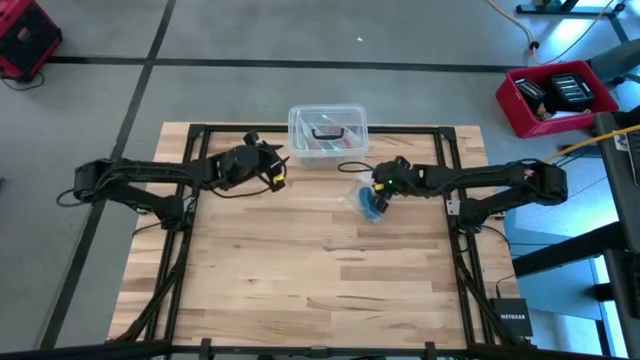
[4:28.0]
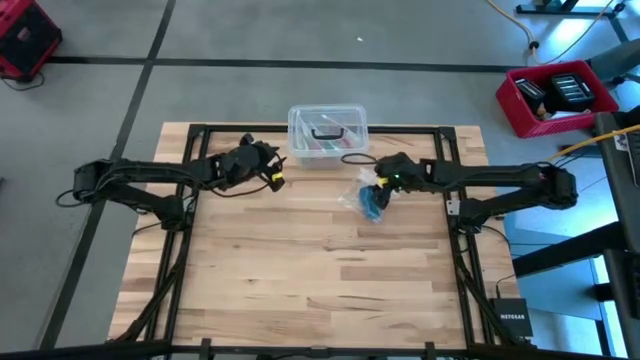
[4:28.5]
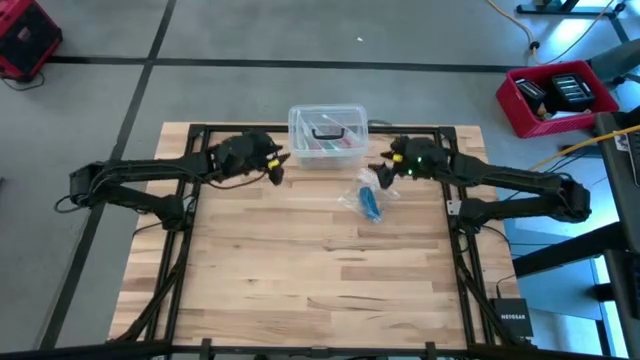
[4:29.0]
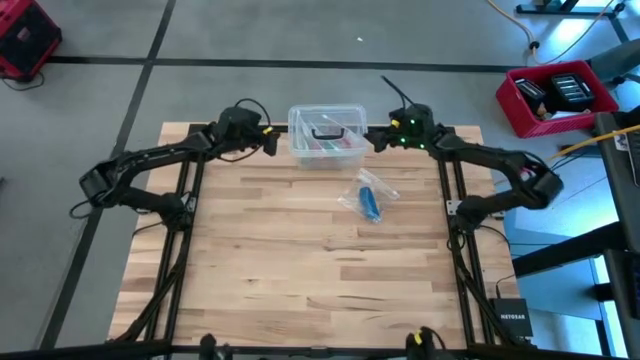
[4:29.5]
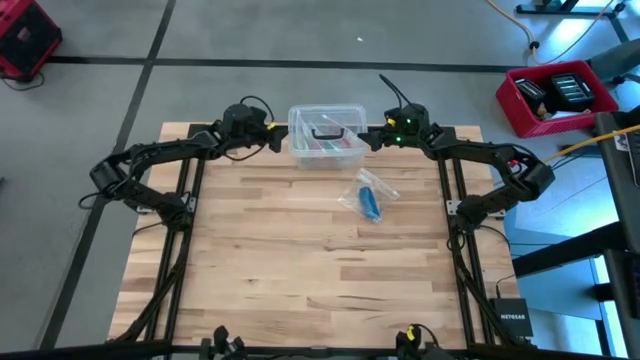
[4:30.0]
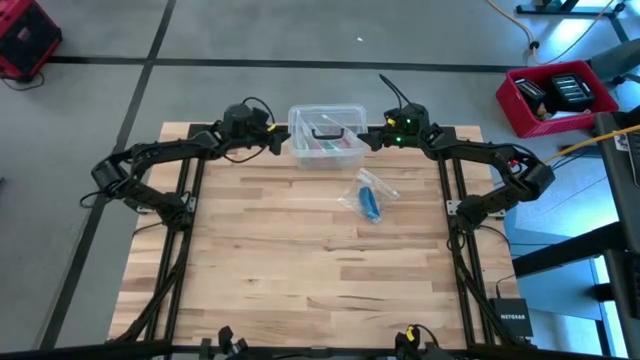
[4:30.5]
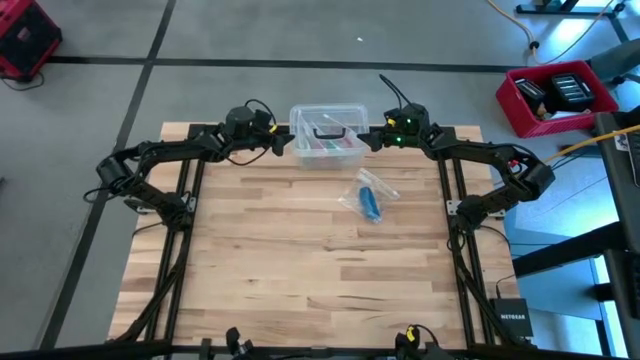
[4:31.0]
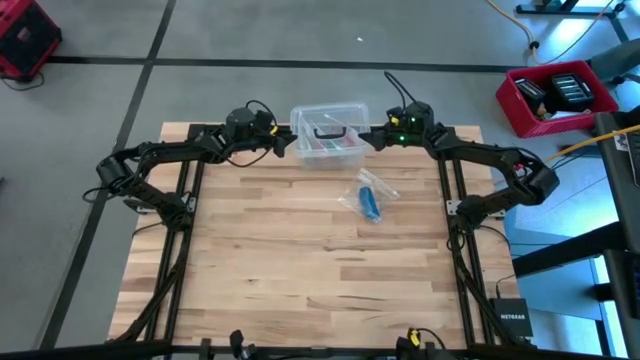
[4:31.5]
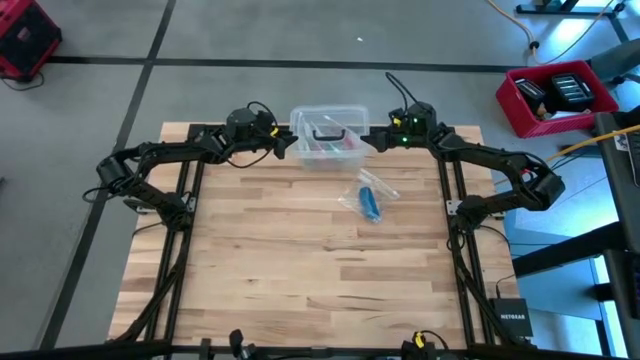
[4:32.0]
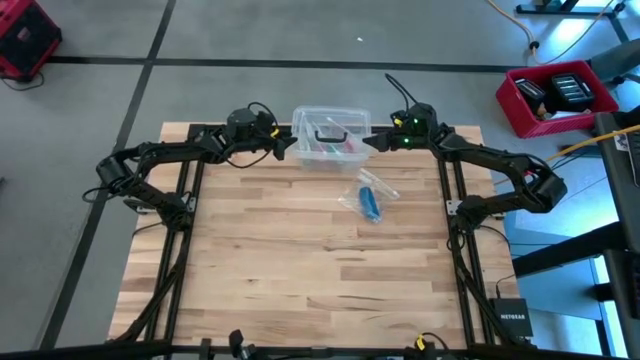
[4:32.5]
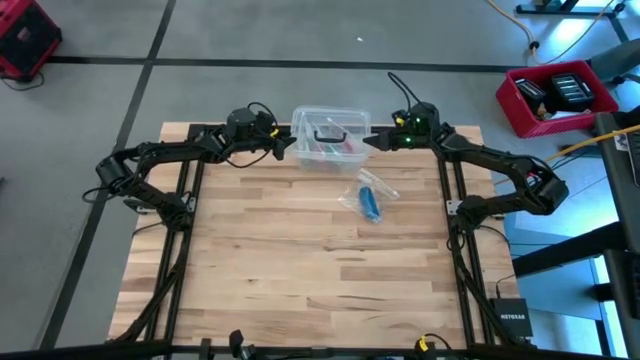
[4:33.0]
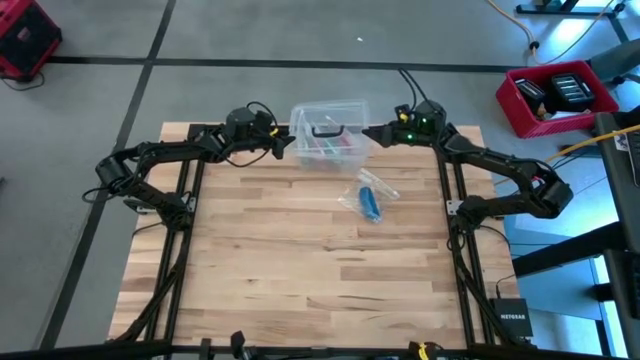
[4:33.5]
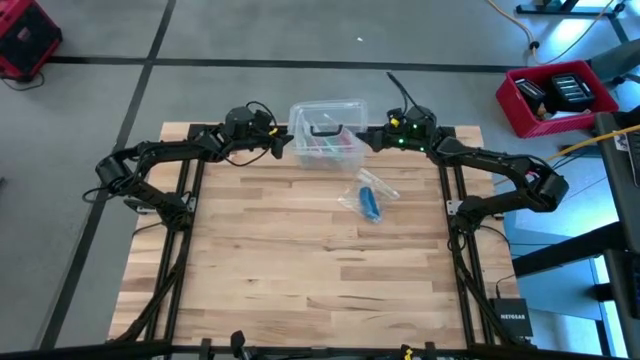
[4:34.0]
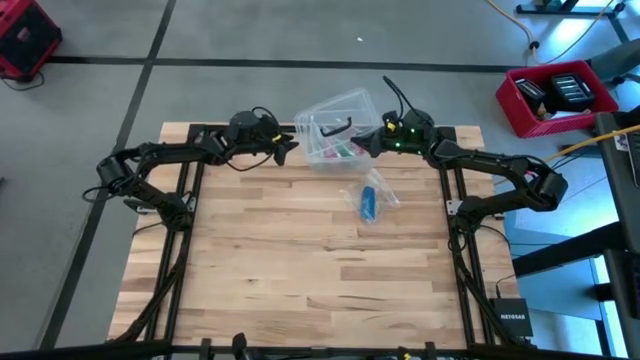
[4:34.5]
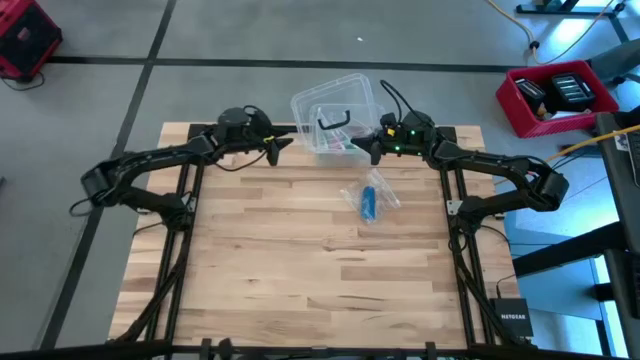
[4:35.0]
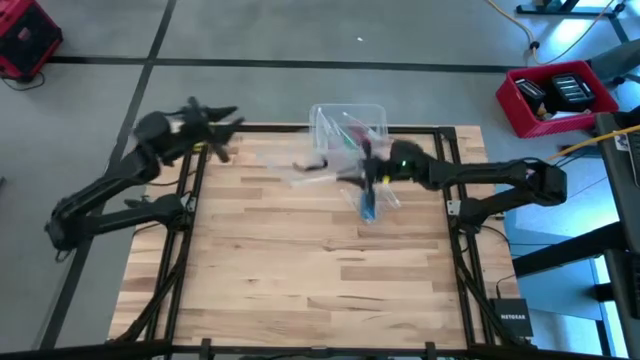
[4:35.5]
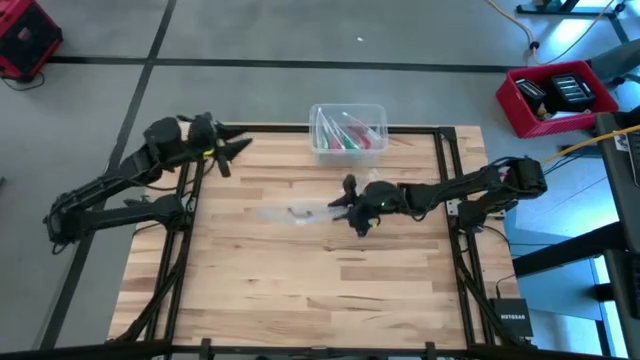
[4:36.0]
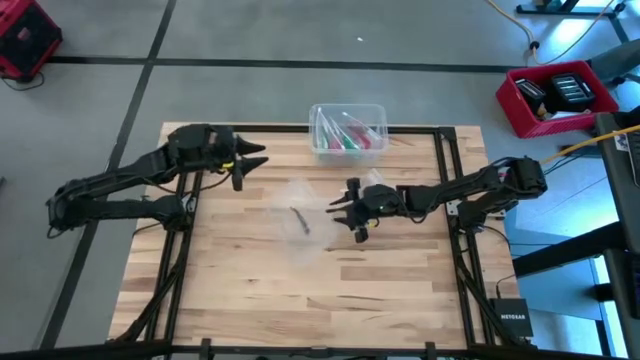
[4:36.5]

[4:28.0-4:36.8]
Task: Roll bandage
Open the transparent bin

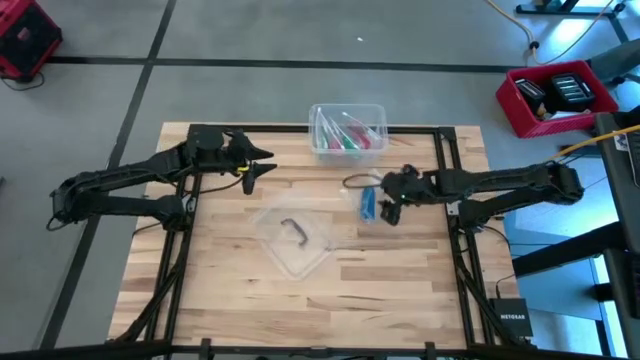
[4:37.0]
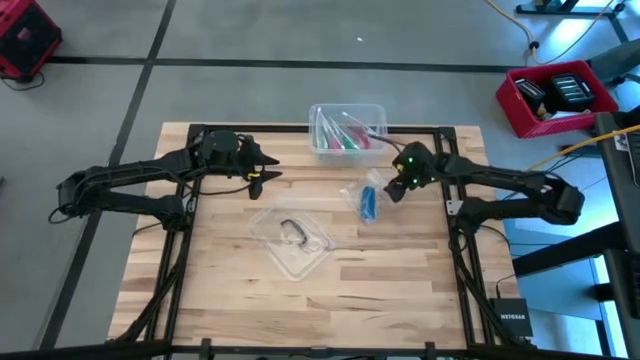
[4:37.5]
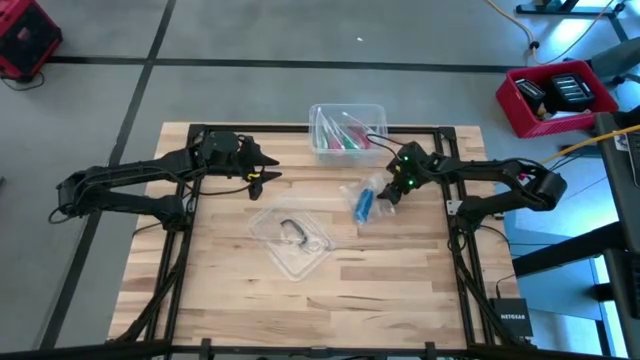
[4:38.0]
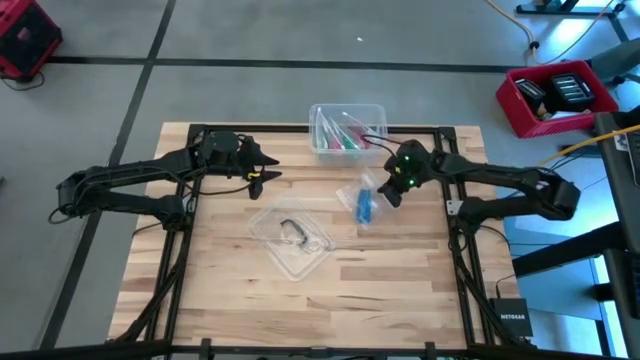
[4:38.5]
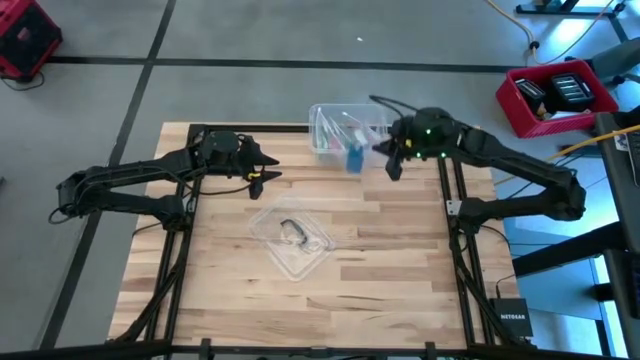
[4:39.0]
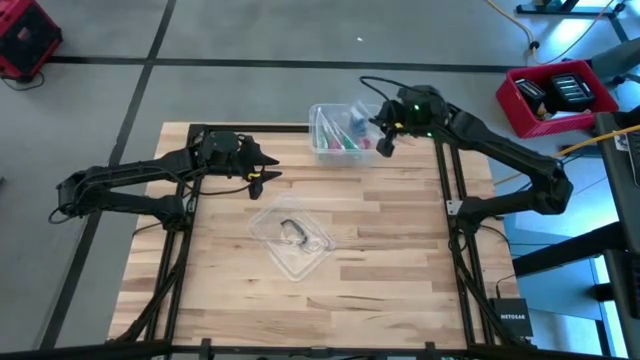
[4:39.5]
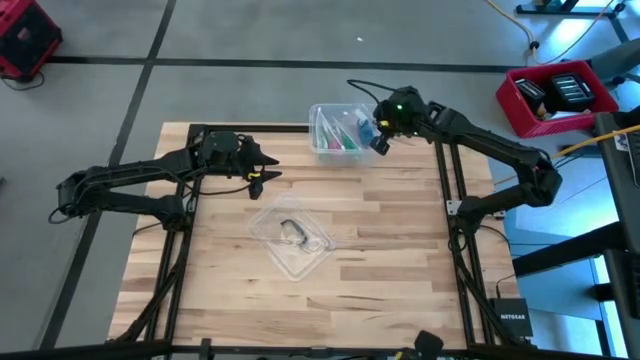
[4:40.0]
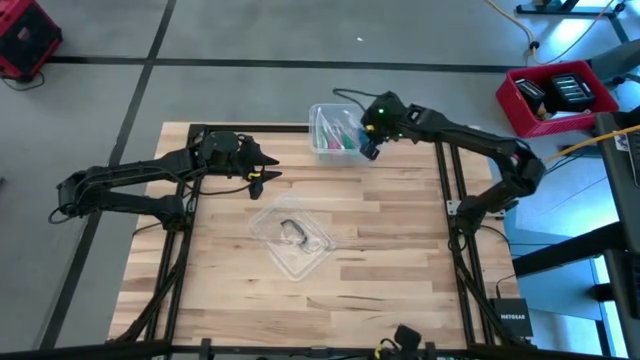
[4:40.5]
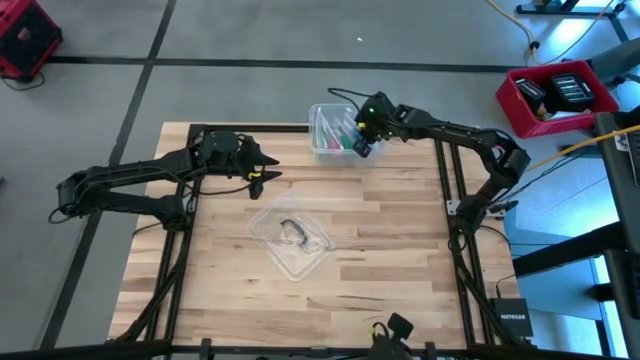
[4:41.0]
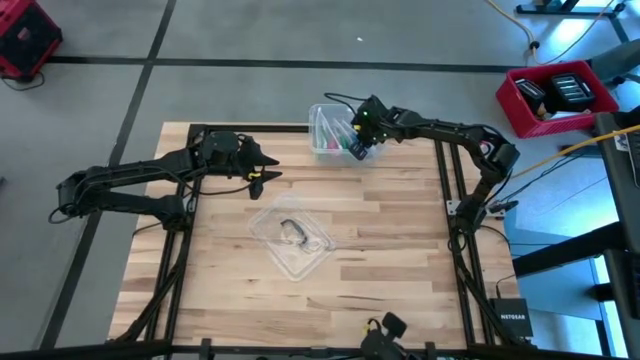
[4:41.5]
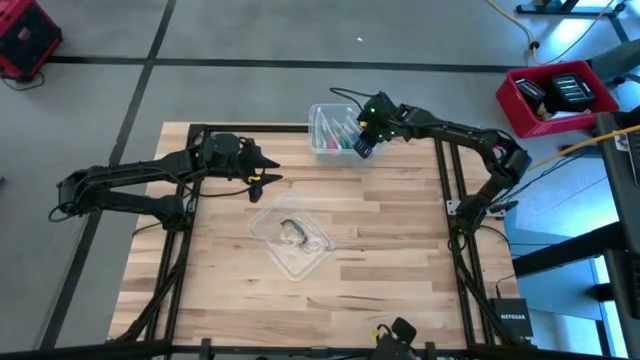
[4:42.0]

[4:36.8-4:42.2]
Put the packed blue bandage into the transparent bin

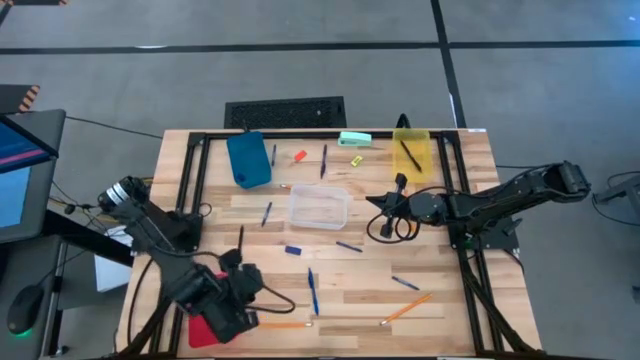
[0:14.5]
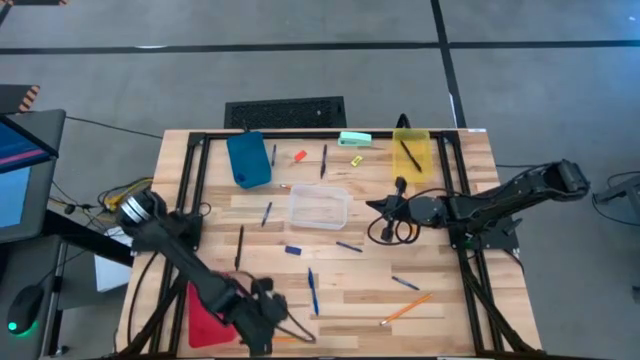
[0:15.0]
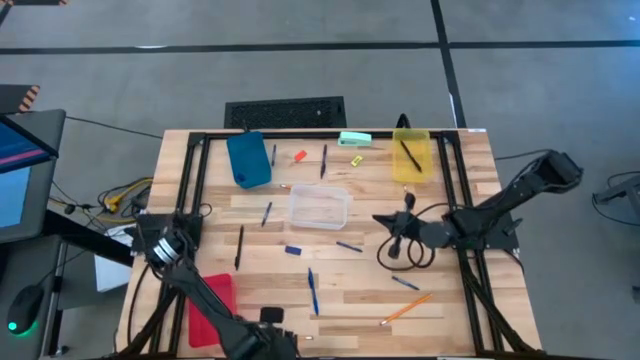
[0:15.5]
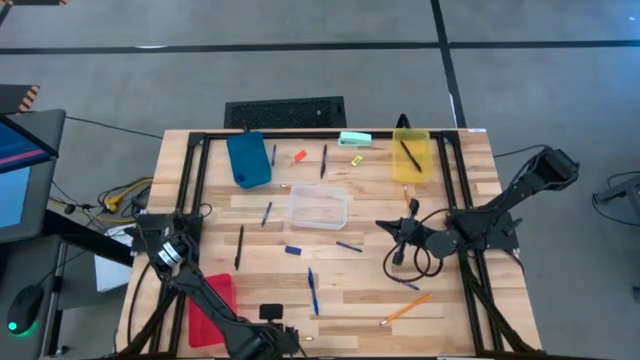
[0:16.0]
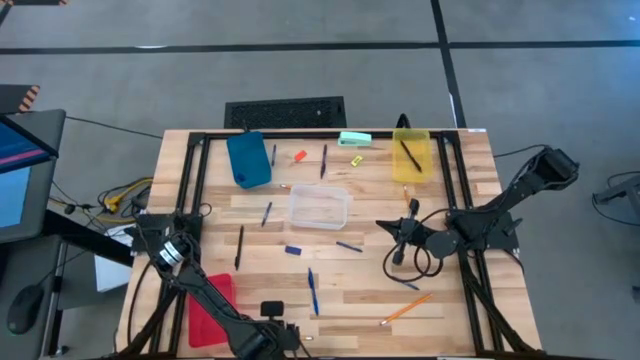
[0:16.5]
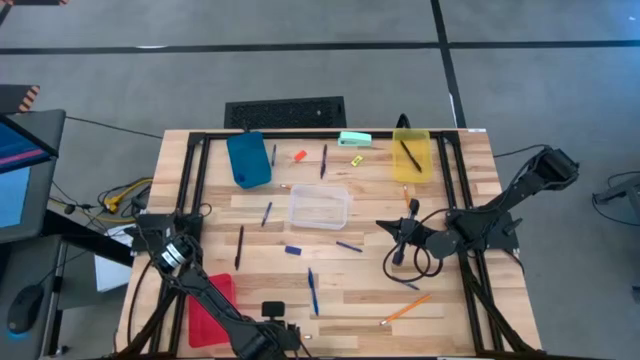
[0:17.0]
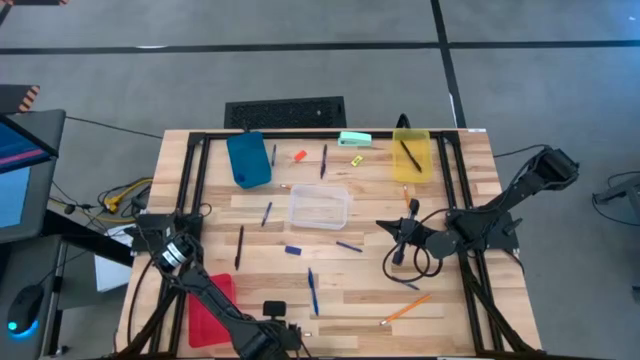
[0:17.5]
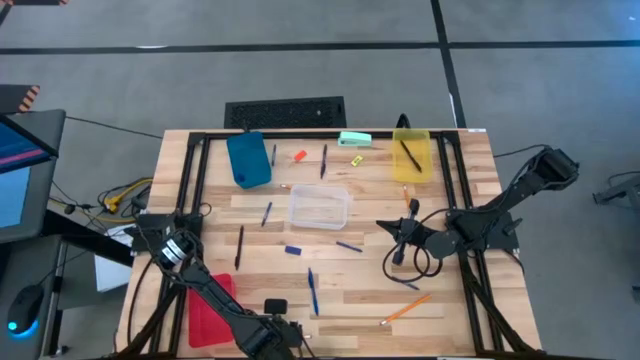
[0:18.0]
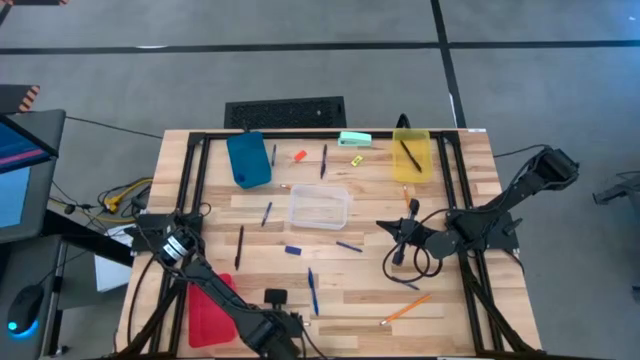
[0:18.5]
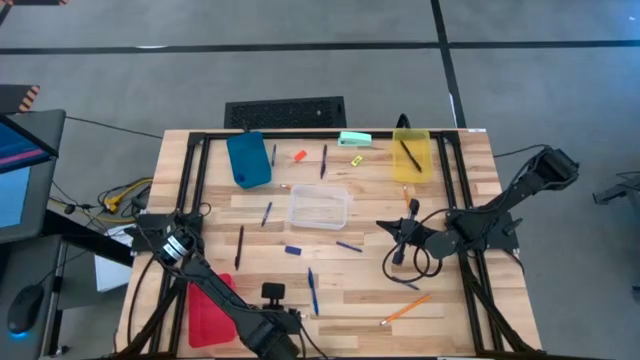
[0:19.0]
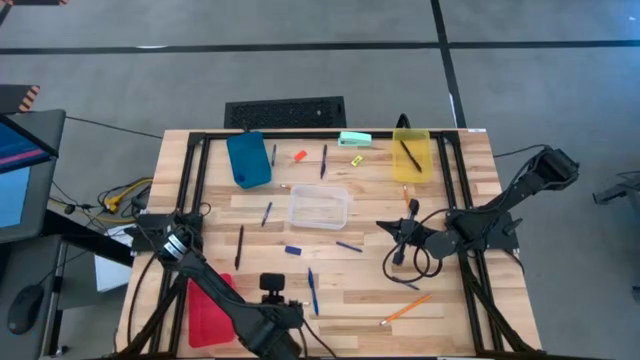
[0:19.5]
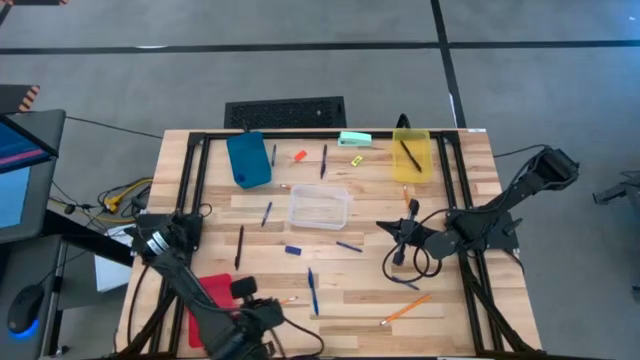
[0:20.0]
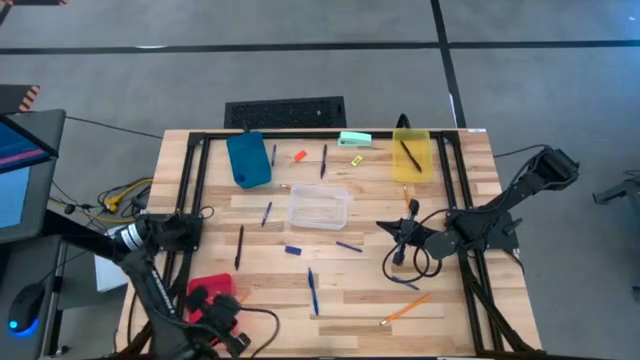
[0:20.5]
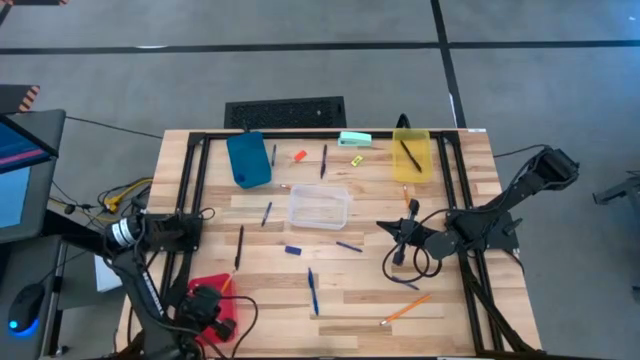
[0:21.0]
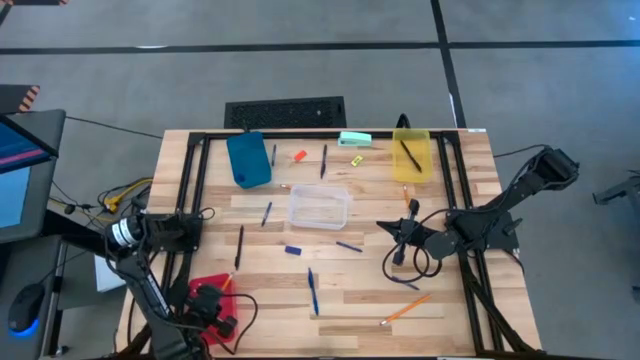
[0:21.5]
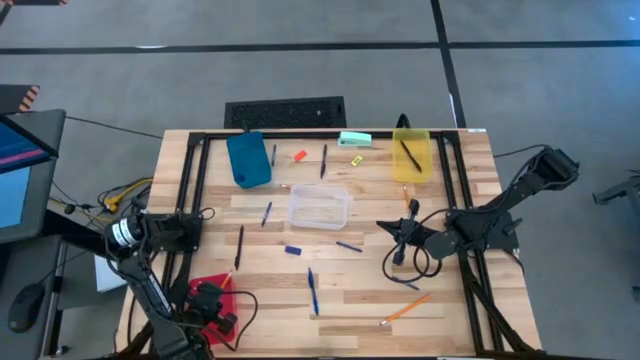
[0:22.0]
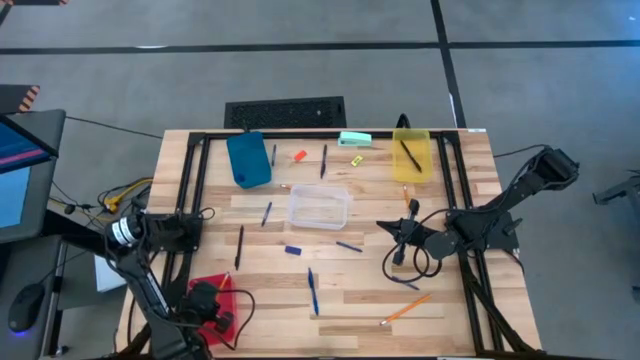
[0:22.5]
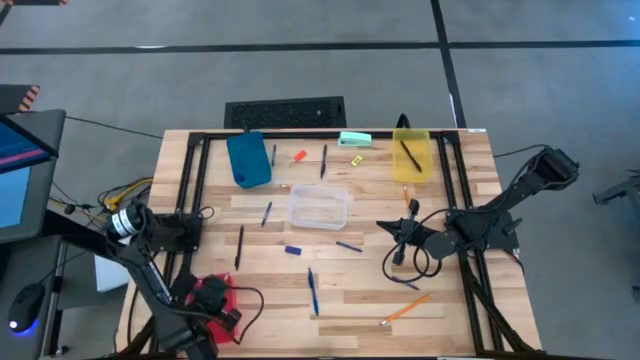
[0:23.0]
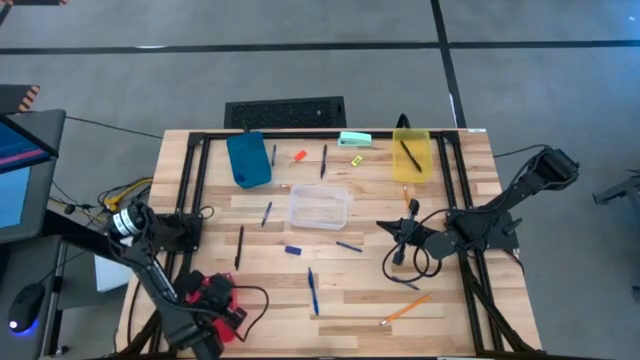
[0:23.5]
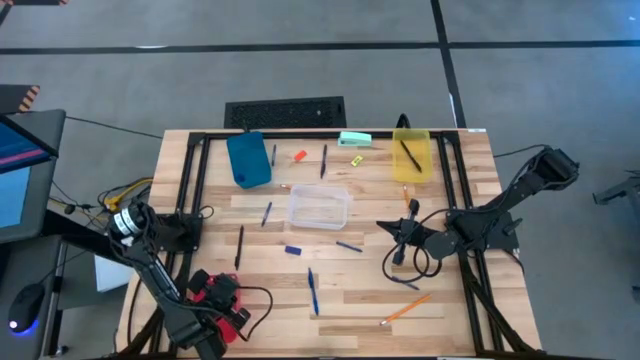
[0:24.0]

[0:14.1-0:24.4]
Task: Sort crayons/erasers/pens/pencils in bins
Put the bottom left yellow pencil into the red bin
